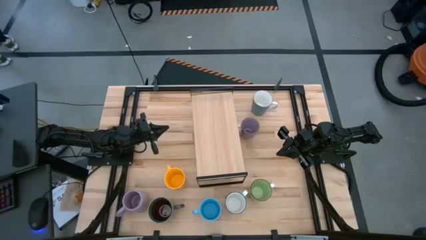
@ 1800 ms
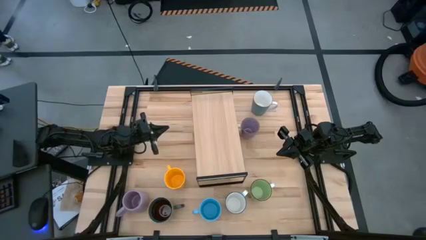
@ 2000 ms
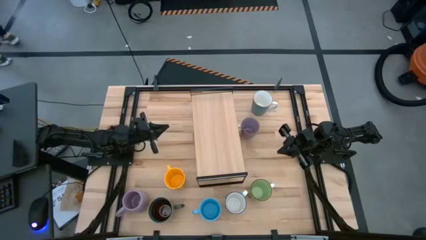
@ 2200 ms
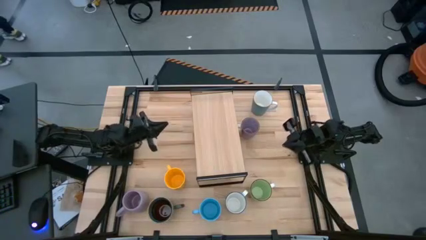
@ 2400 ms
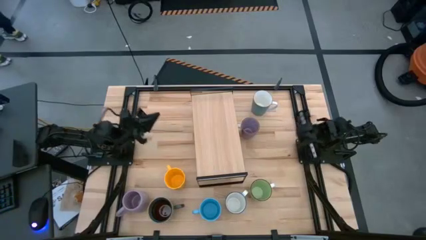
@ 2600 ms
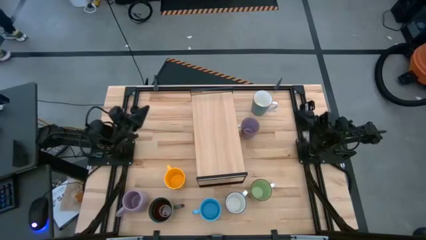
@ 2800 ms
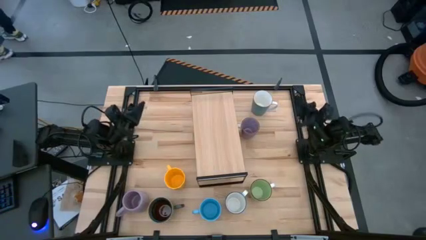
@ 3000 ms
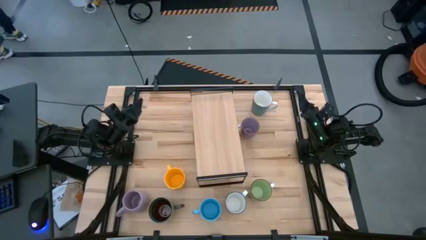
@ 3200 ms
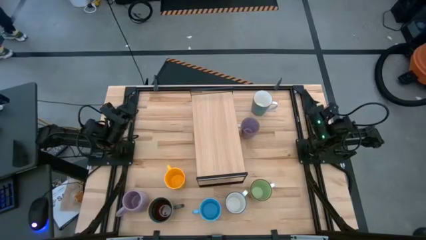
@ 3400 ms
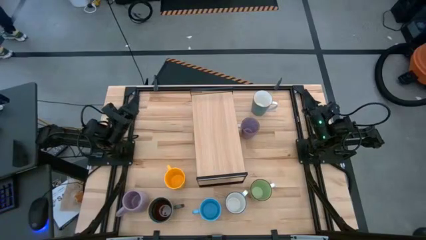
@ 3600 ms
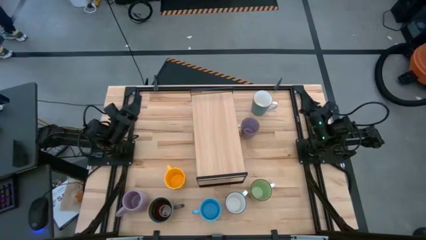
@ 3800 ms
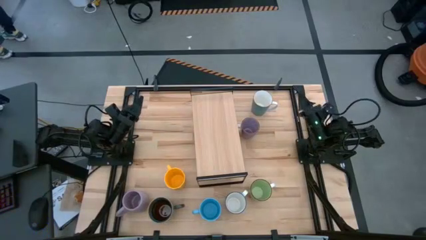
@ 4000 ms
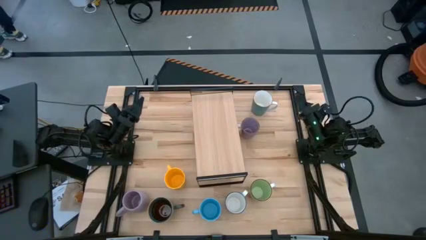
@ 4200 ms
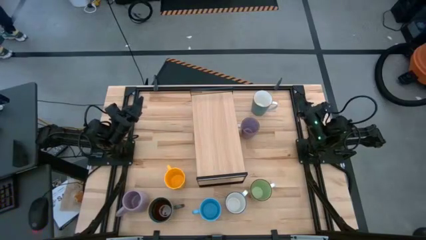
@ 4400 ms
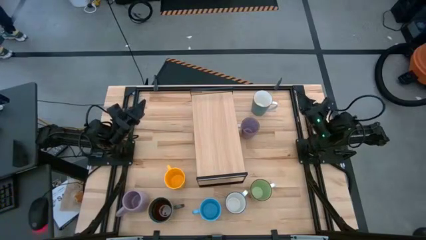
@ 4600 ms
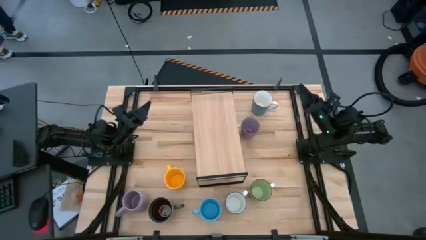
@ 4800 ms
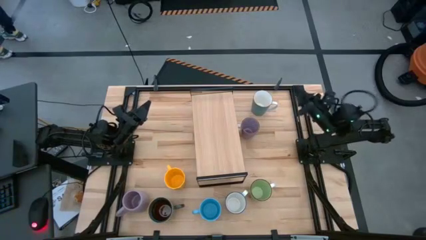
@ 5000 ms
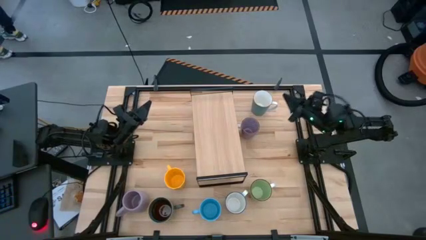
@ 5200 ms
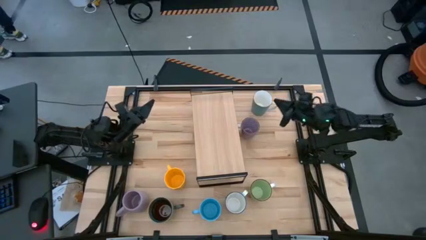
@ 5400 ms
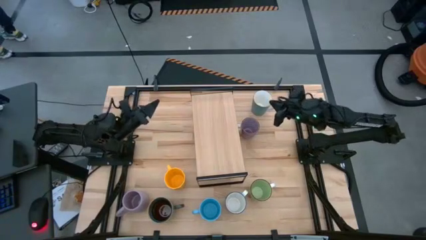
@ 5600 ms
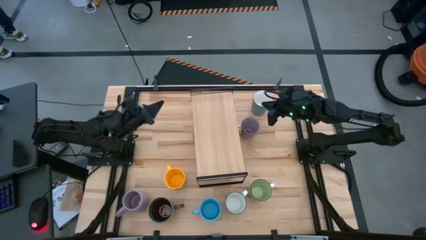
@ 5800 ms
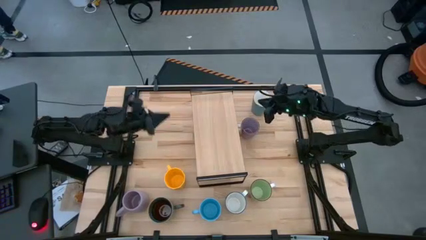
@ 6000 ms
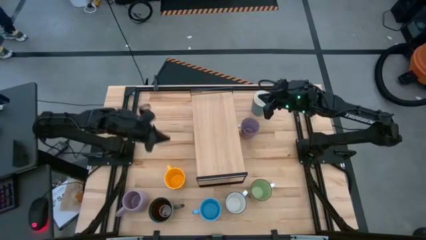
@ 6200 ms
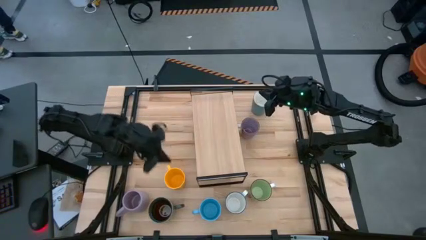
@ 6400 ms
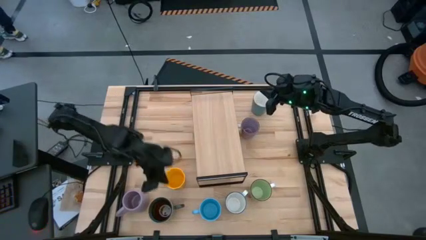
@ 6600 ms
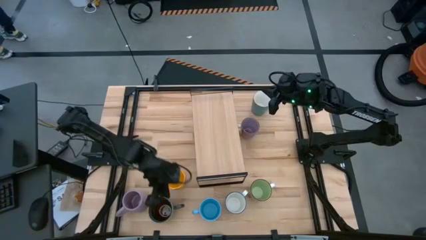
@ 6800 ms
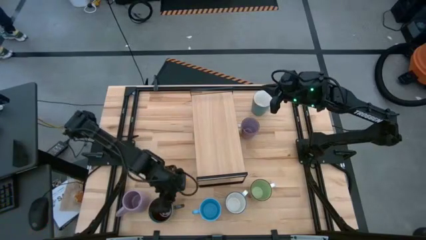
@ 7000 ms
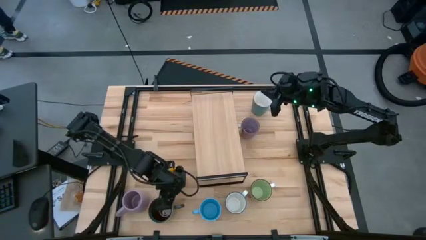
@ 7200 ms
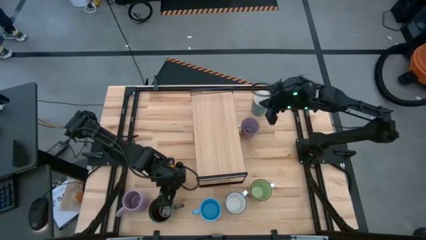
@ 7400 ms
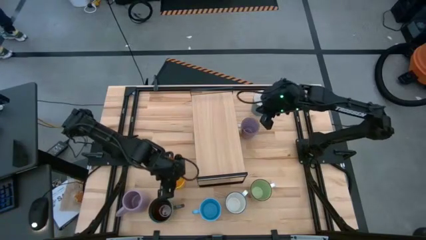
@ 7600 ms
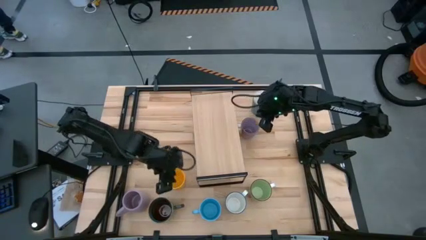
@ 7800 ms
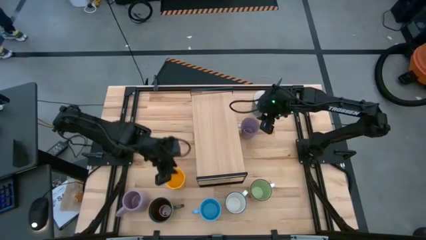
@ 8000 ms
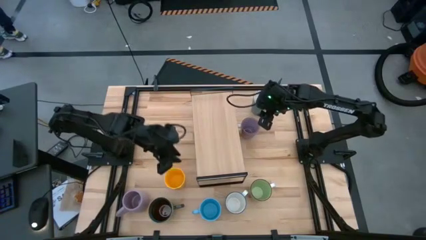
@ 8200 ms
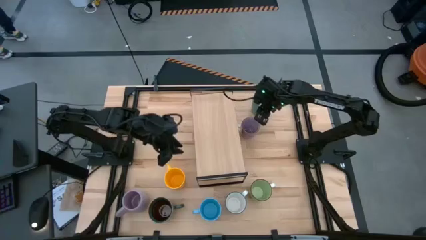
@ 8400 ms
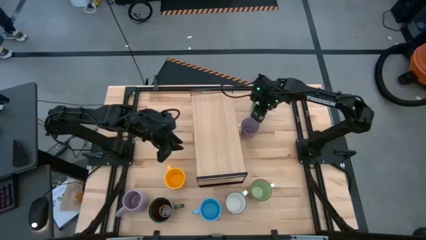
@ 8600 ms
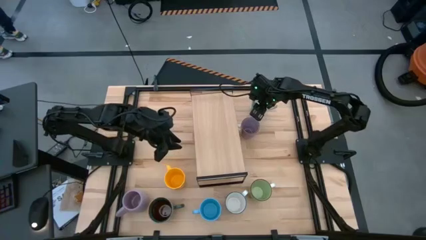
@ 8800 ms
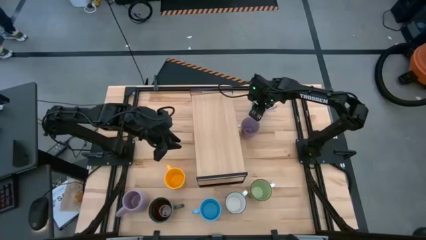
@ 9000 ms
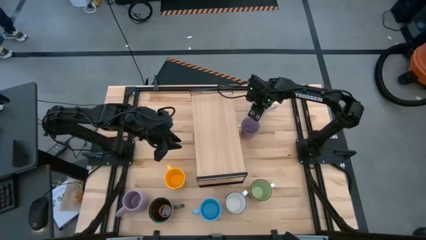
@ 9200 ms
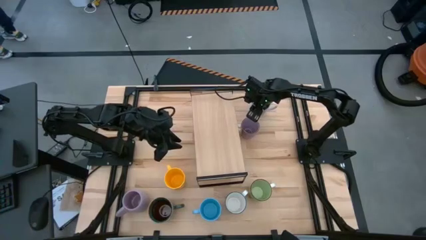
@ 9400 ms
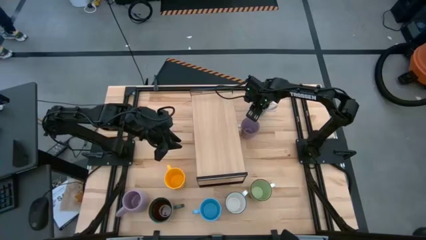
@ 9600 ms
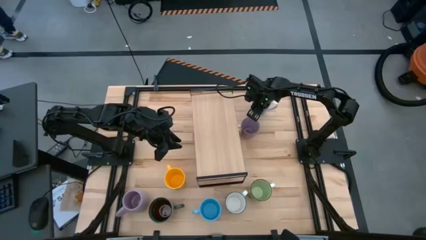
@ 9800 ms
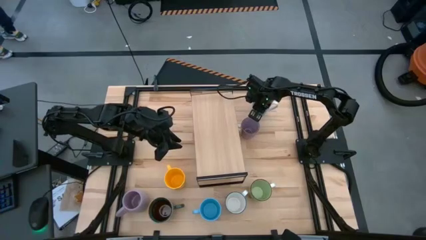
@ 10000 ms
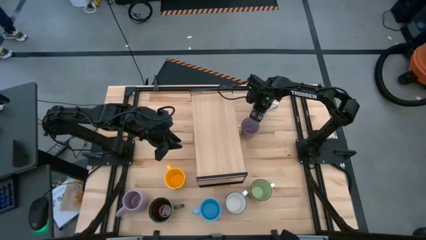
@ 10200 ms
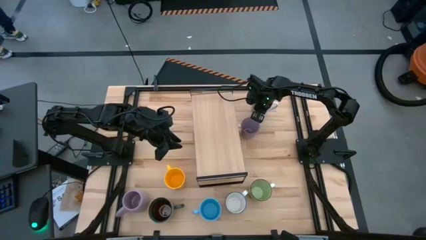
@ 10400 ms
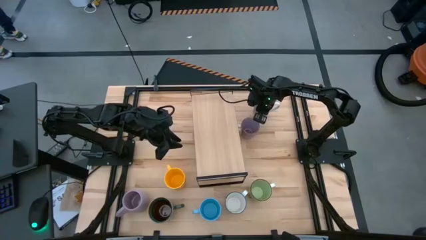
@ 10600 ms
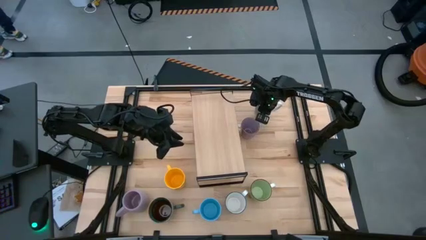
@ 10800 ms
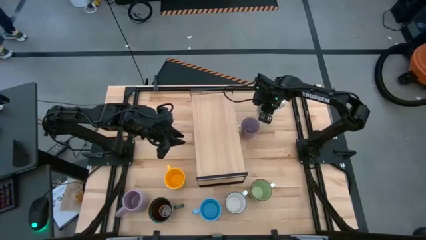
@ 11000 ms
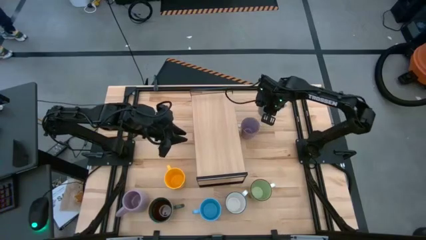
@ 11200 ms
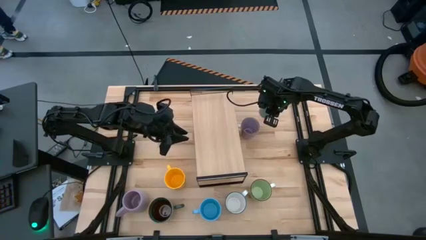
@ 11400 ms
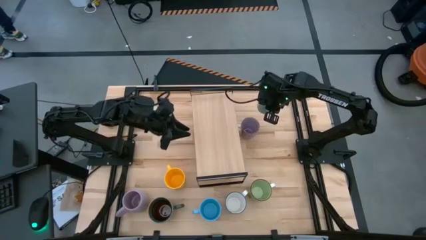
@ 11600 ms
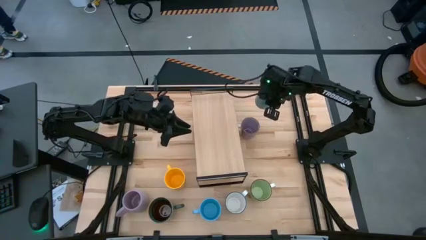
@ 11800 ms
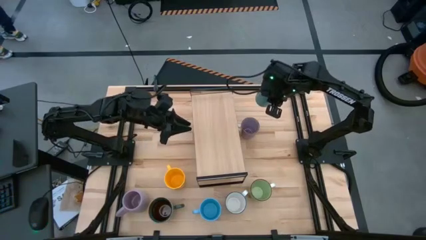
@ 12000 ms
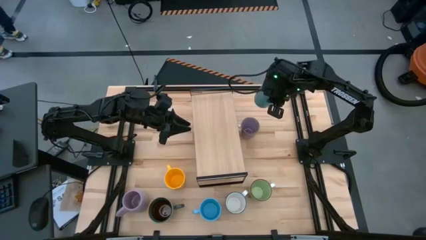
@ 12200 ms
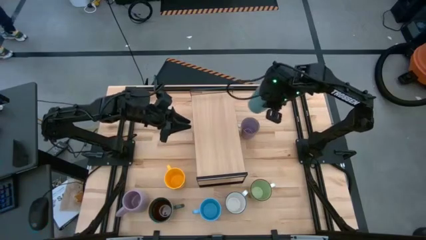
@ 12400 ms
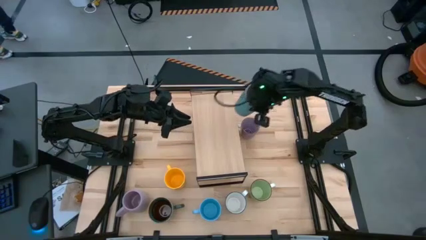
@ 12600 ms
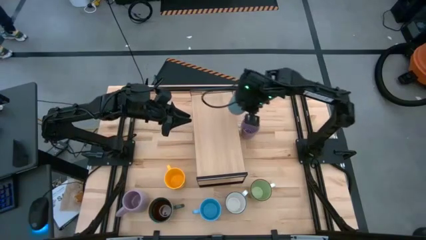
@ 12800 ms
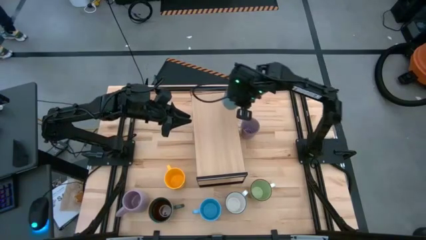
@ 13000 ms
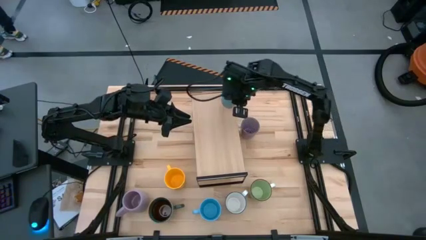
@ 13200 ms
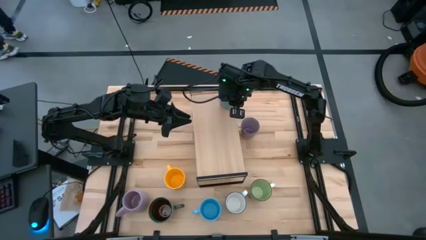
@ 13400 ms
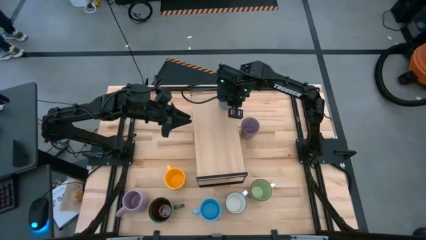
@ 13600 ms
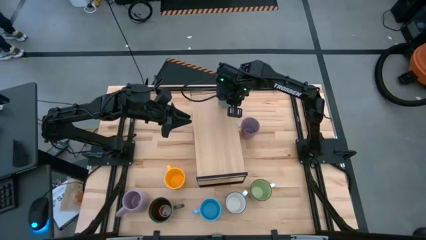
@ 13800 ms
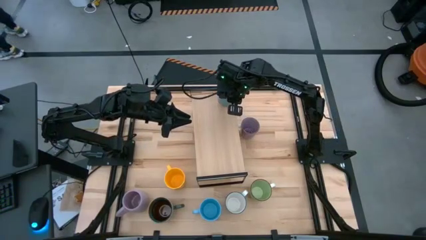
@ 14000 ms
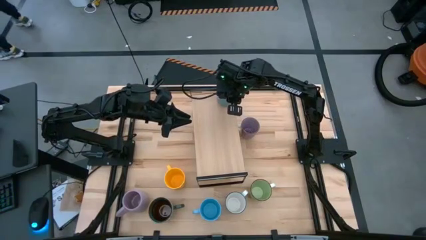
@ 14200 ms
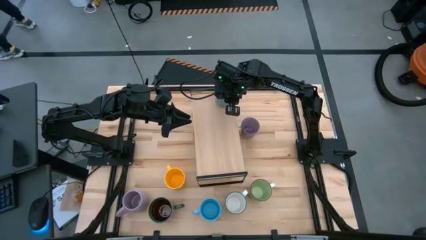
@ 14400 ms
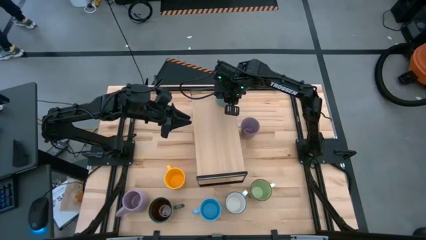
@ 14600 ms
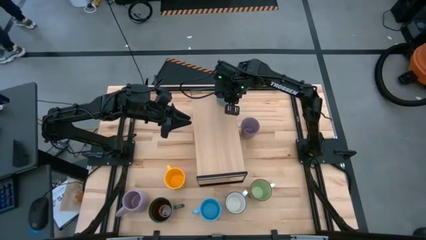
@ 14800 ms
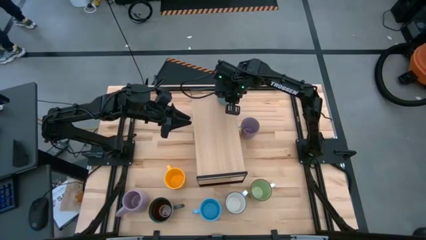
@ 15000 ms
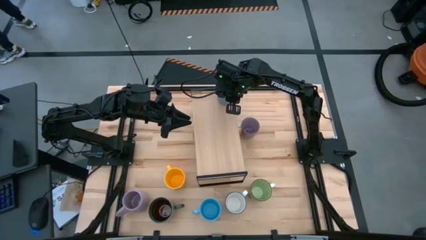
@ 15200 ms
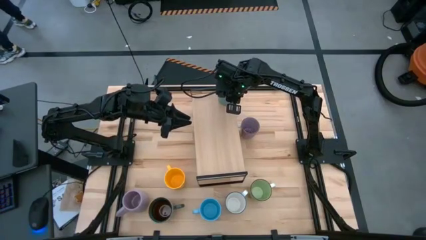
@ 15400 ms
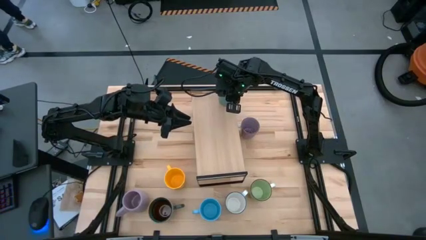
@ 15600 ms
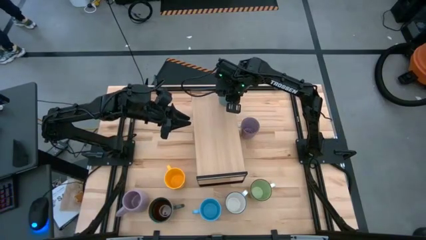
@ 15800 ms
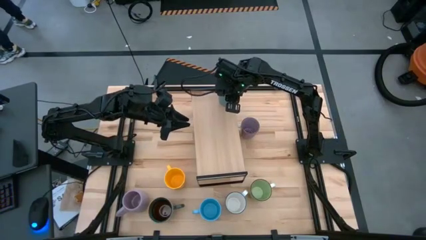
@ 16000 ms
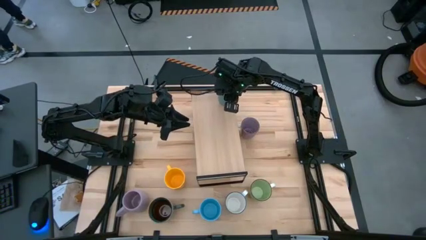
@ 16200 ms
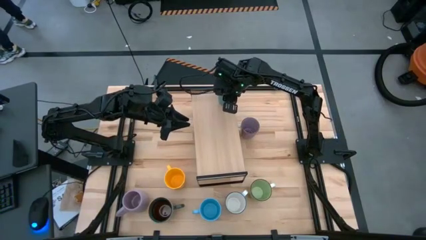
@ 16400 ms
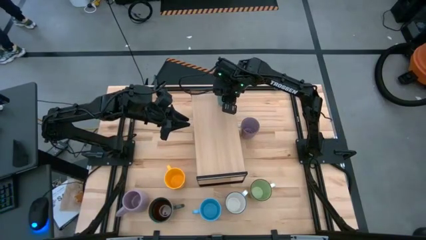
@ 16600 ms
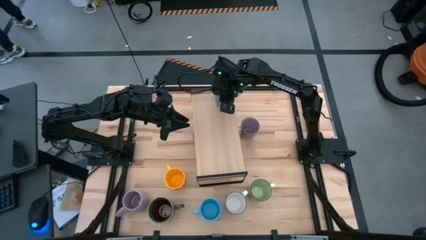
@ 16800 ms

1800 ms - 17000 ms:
Task: Place coffee mugs
Put the light blue mug on the shelf
